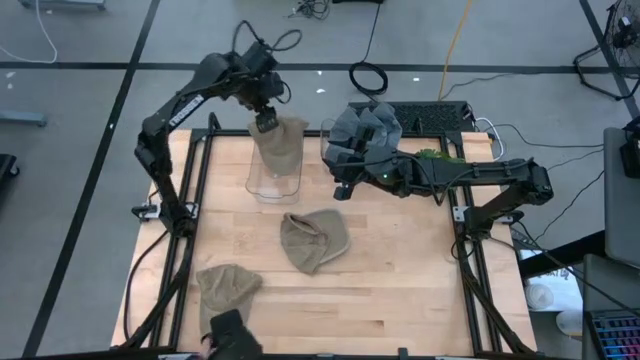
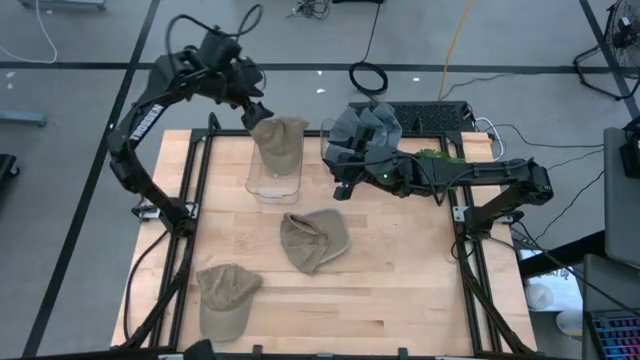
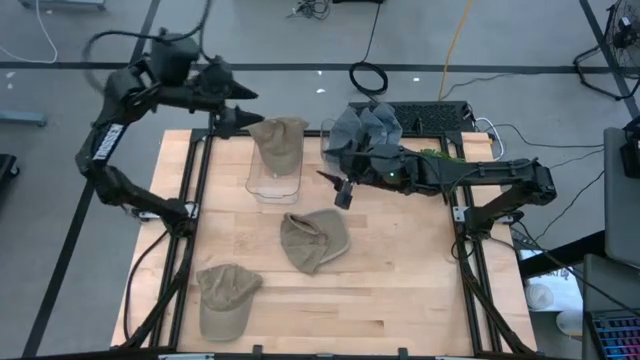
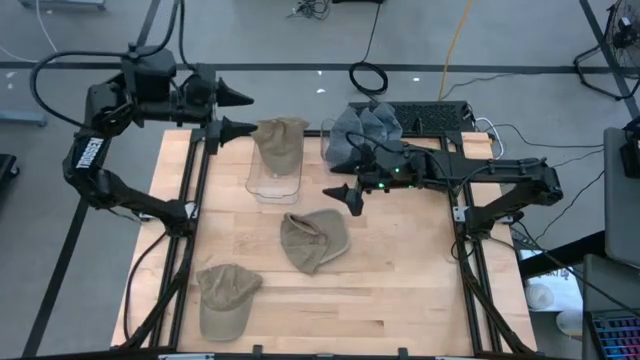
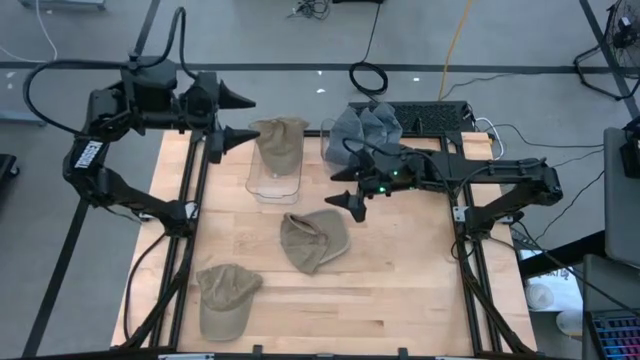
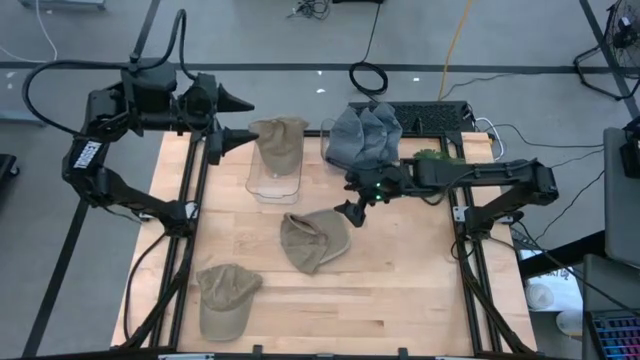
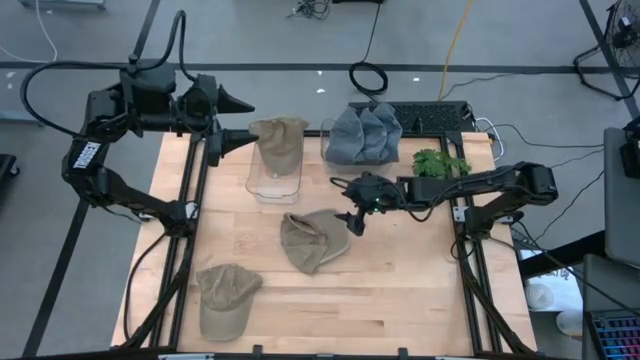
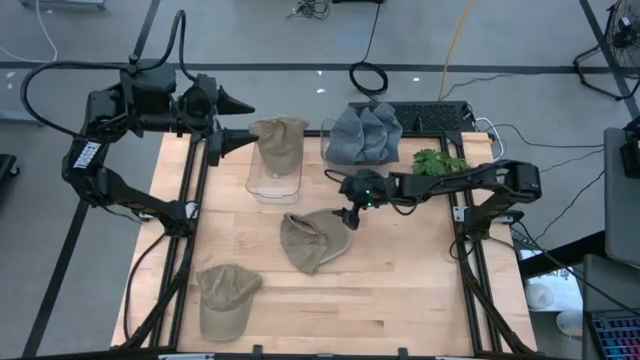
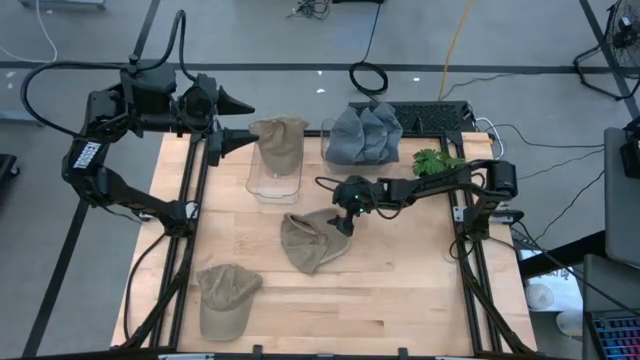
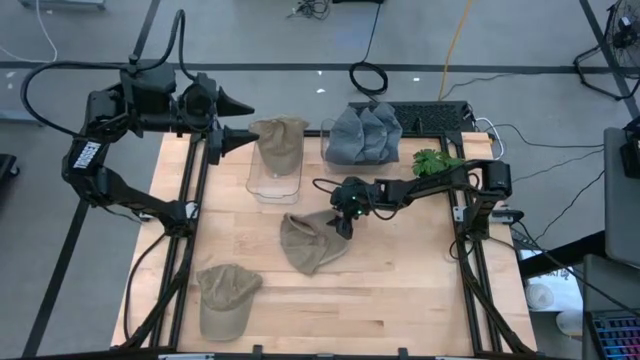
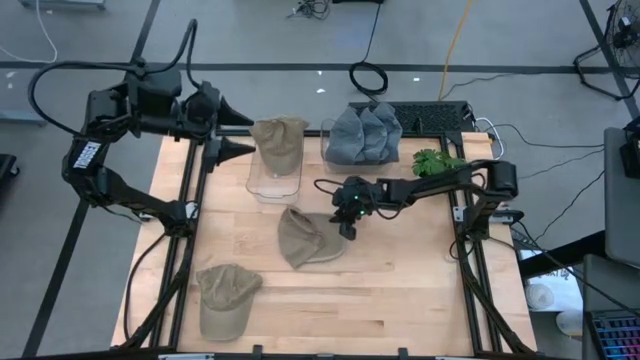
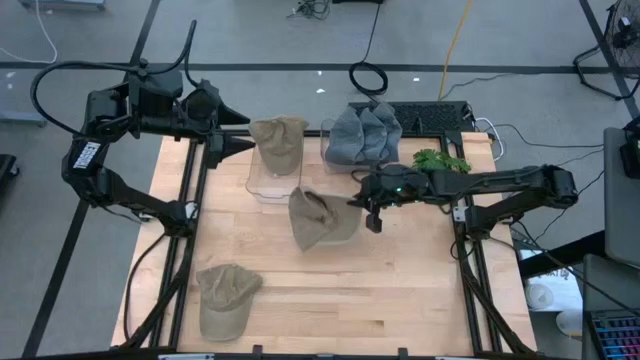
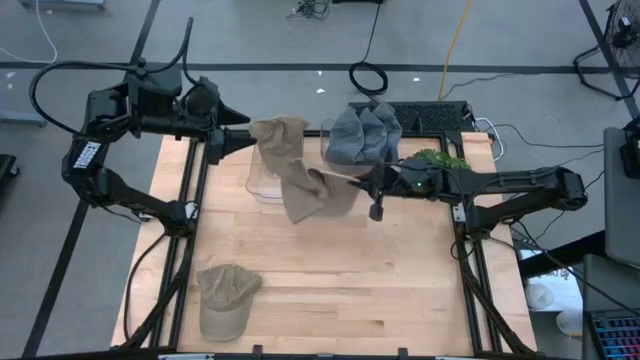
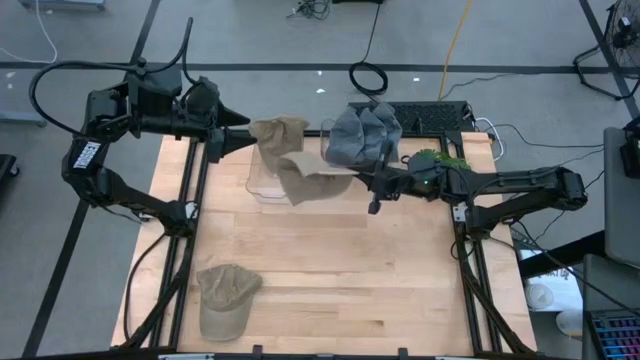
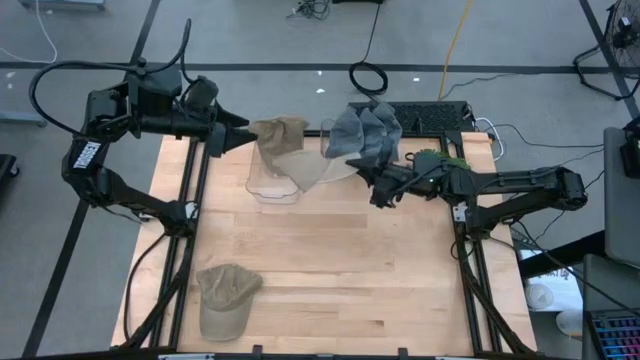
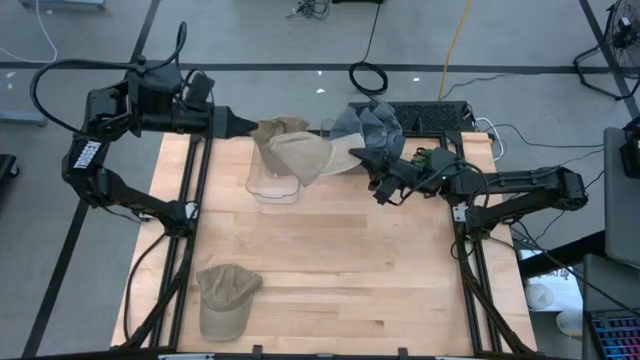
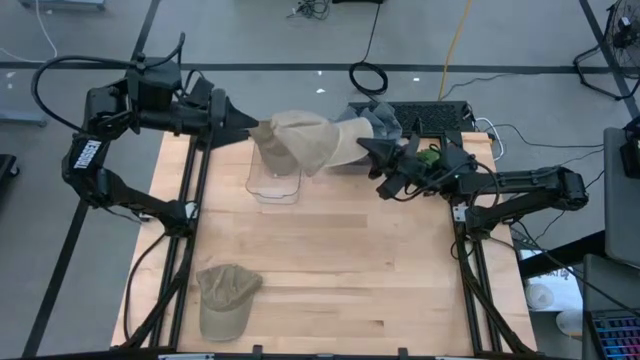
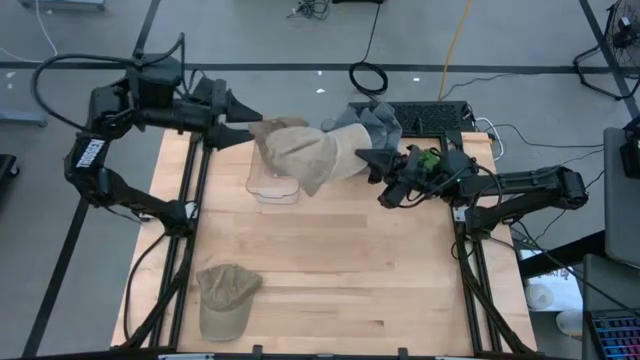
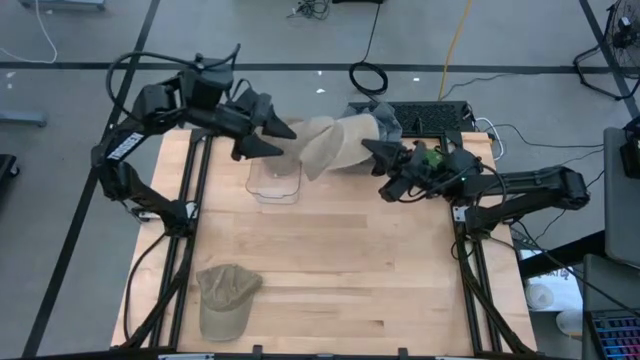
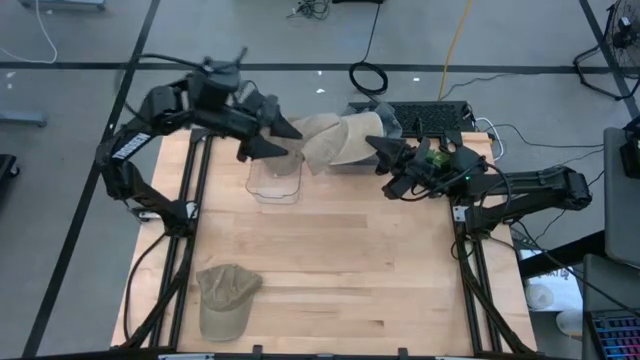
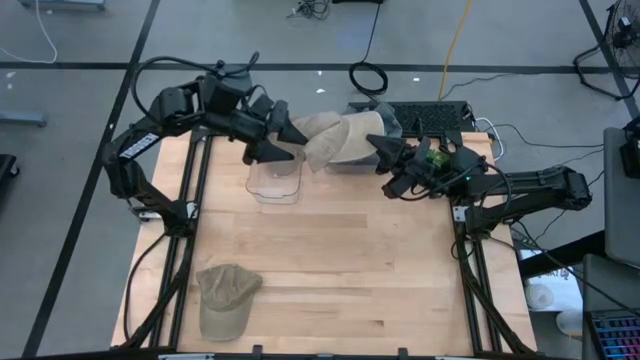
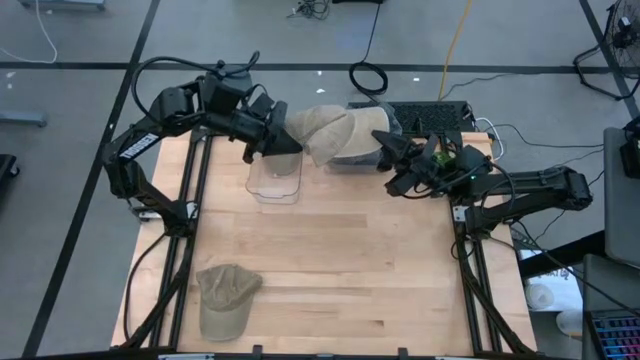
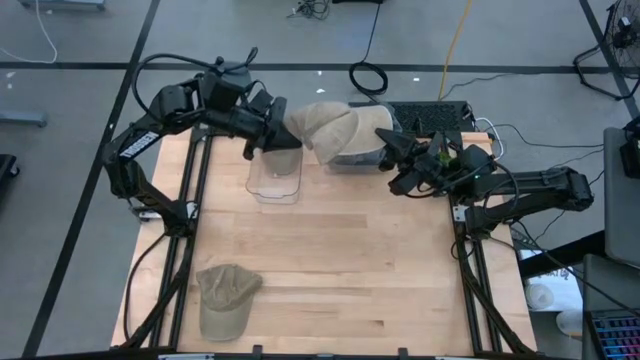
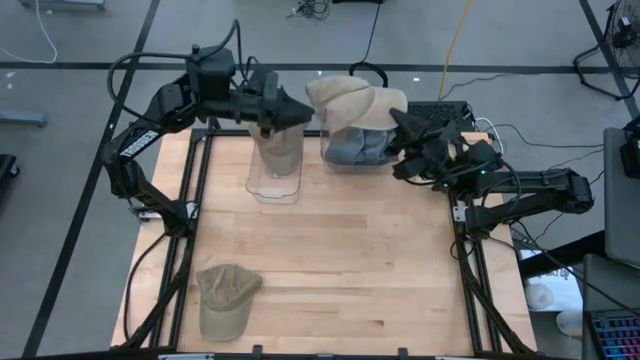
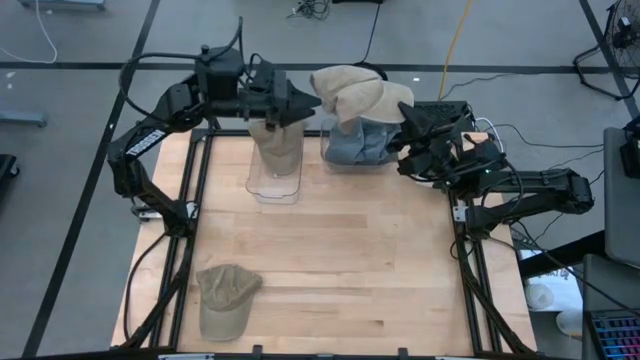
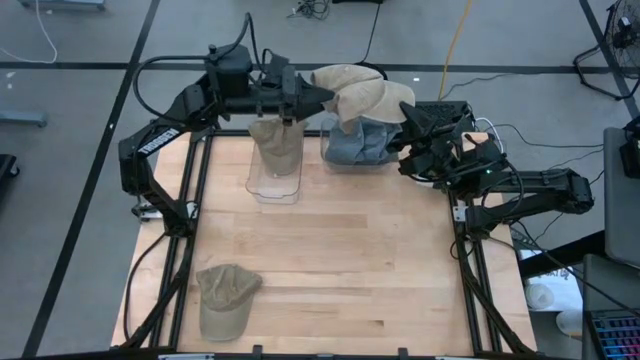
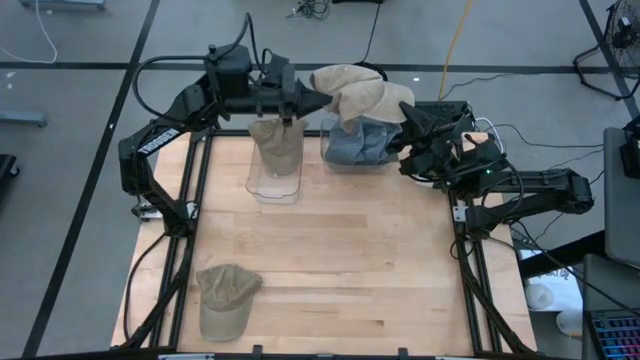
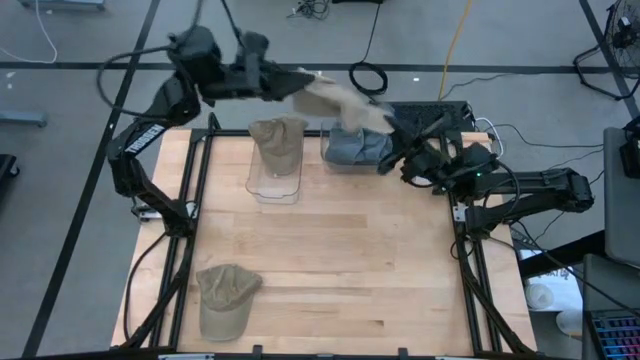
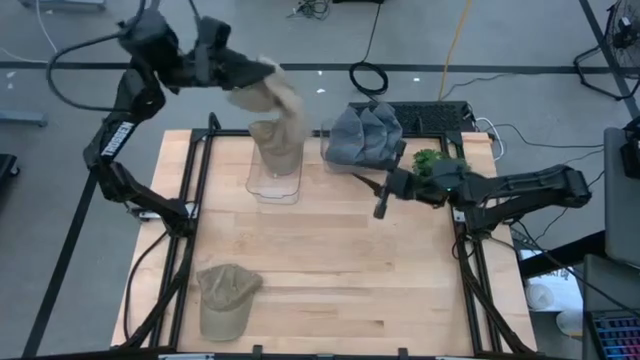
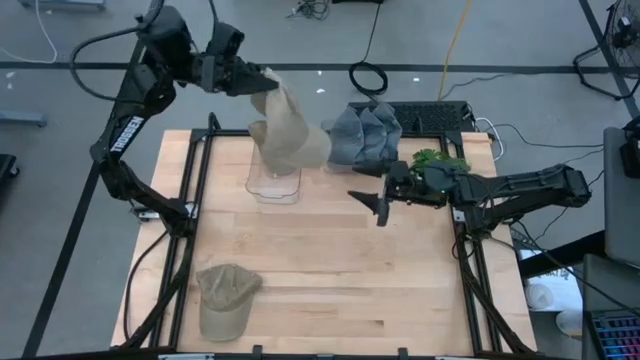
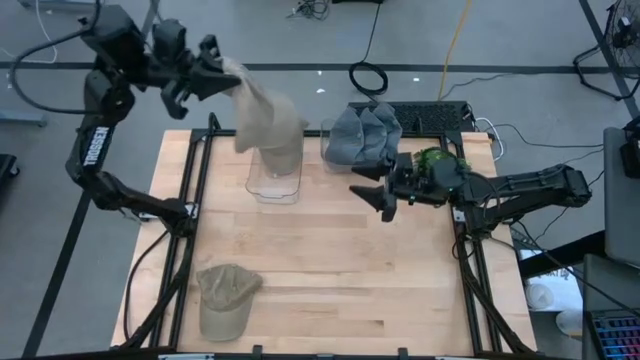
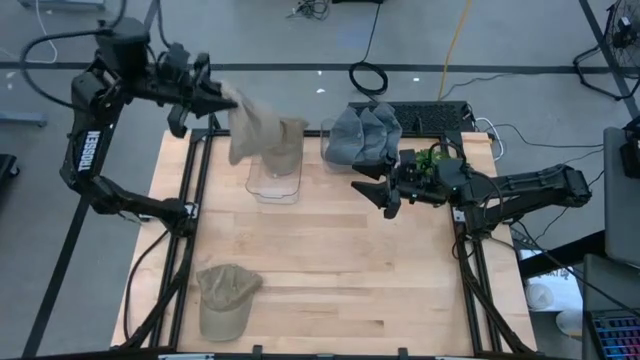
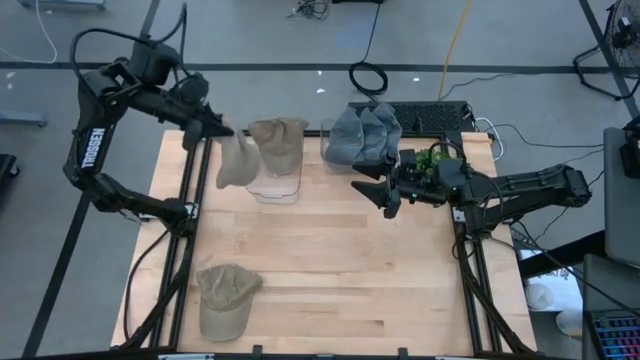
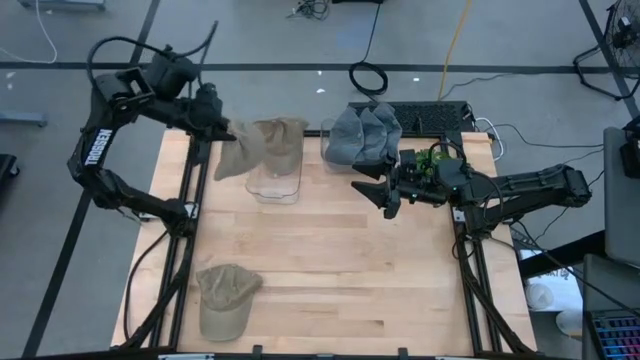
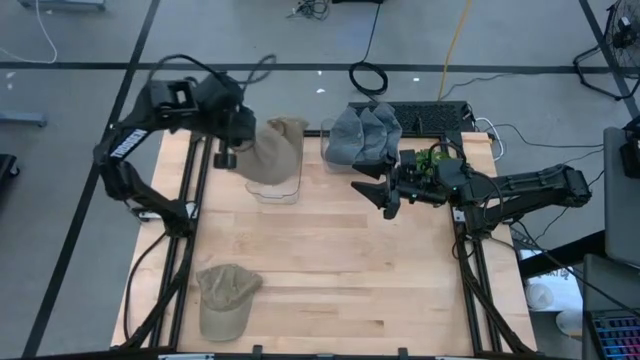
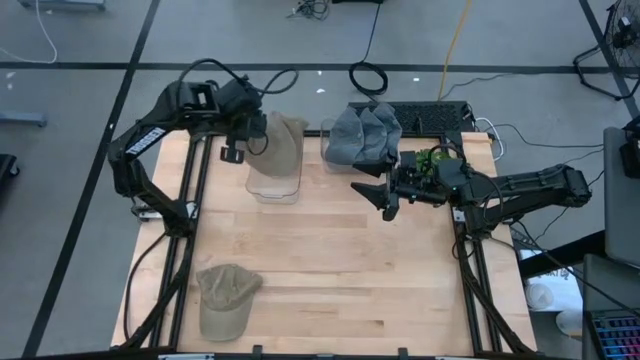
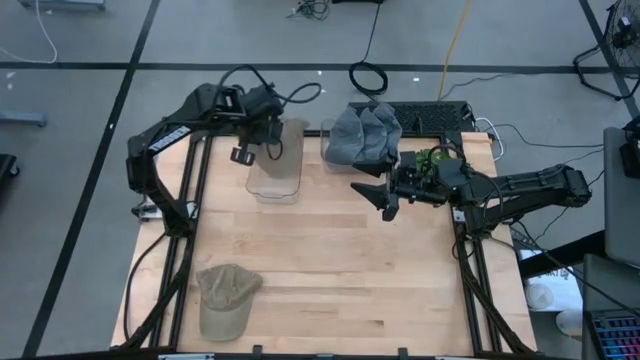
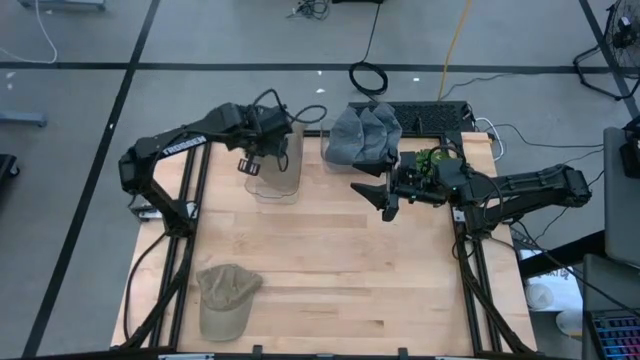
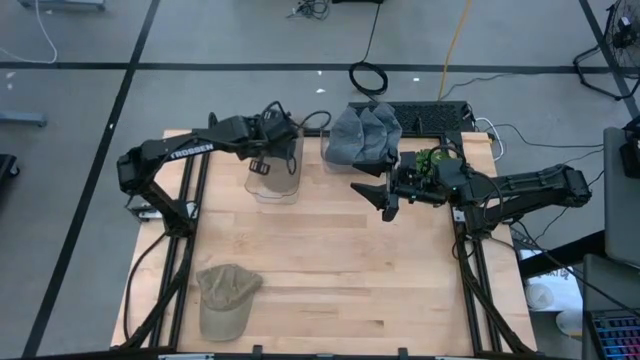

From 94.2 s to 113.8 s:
Task: Pick & Place hat
Put the right brown cap into the left transparent bin

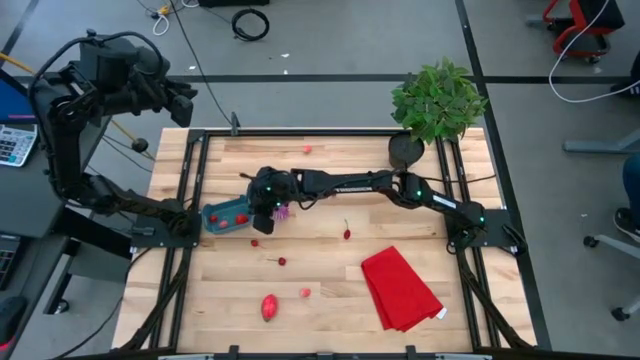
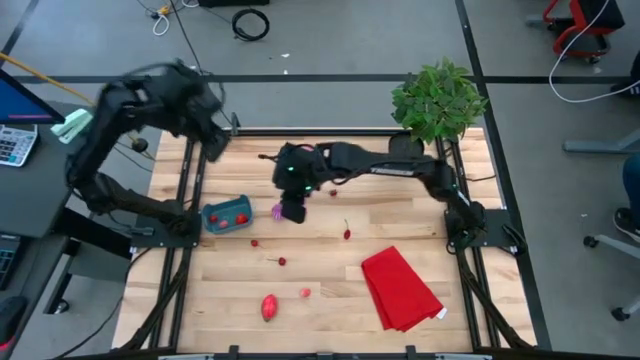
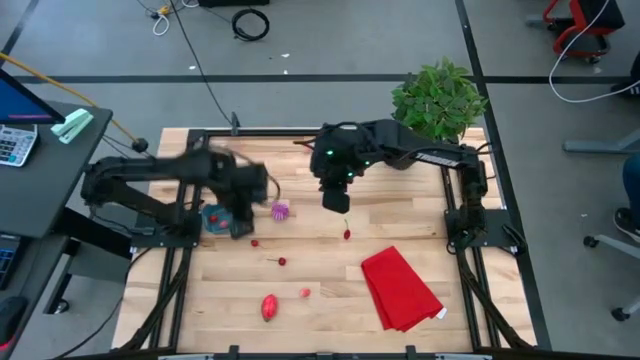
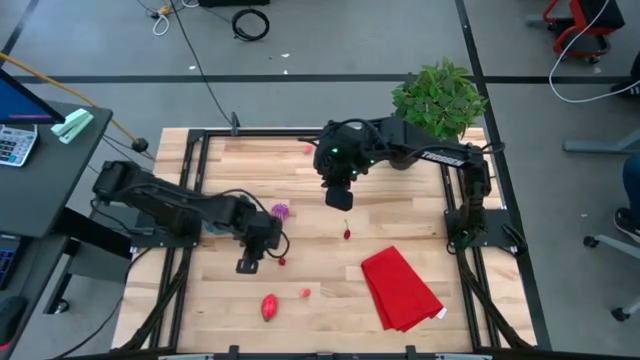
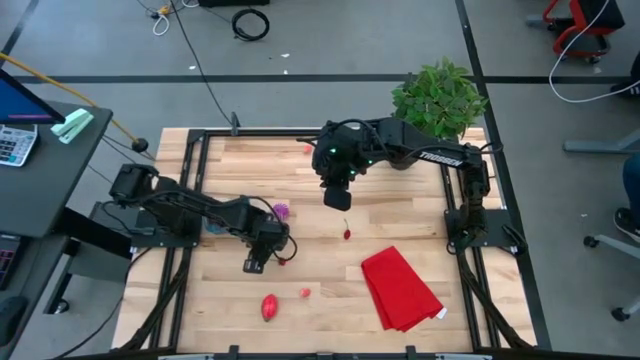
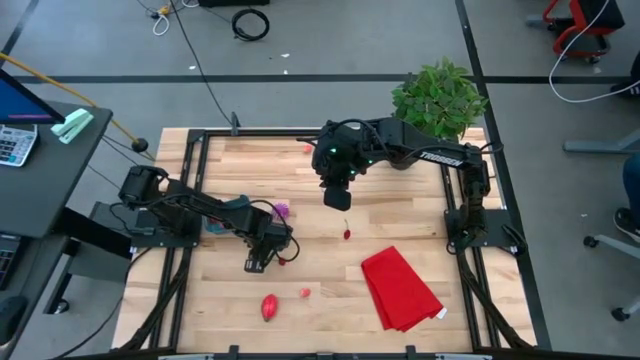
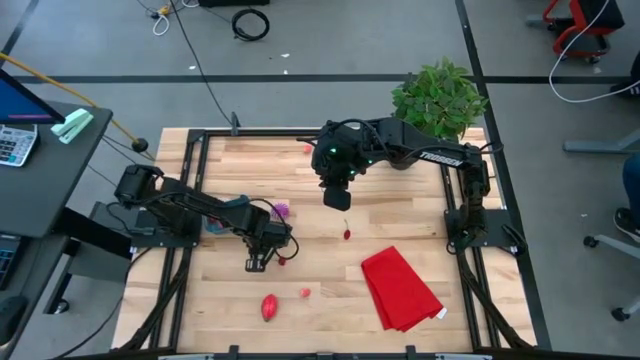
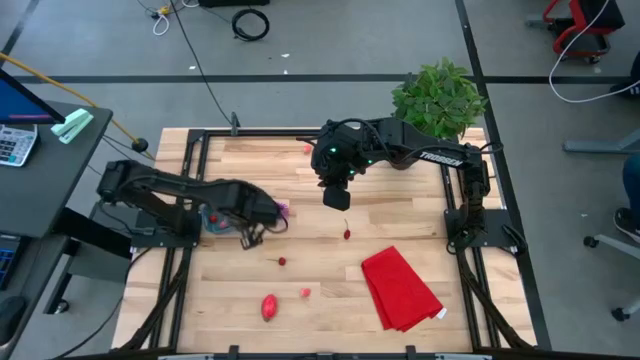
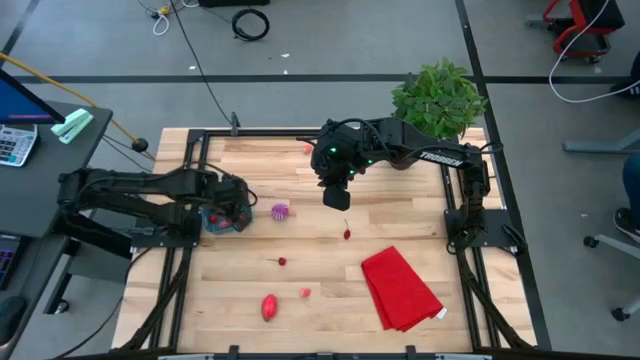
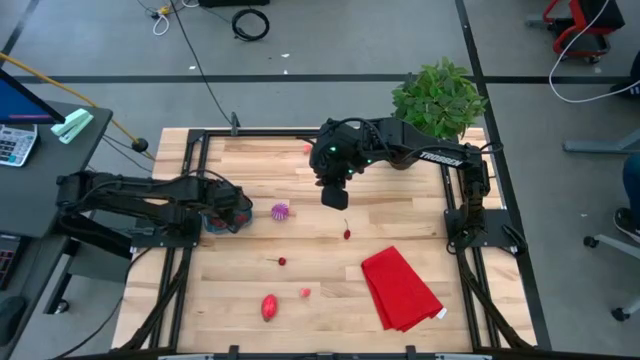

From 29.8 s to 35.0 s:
Task: Pick and placing Produce into tupperware
Put the top left red cherry into the blue bin
